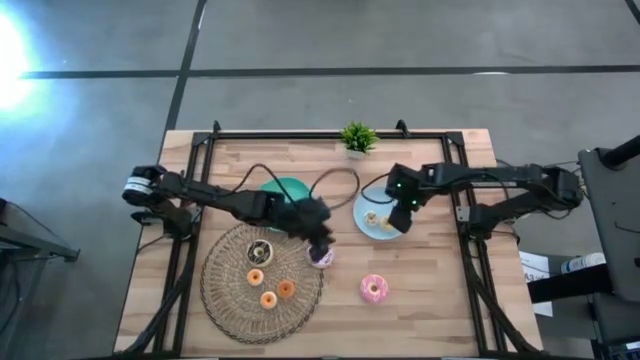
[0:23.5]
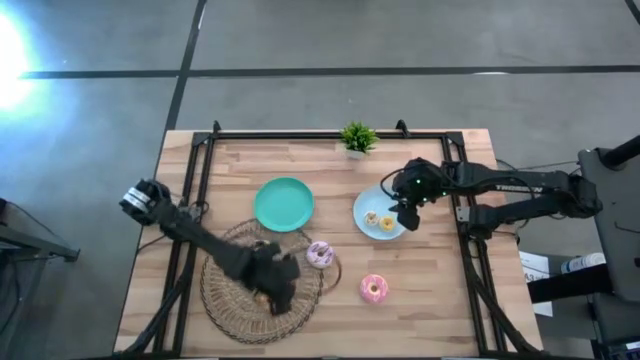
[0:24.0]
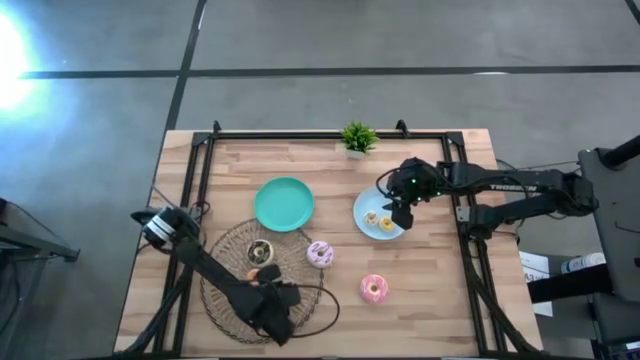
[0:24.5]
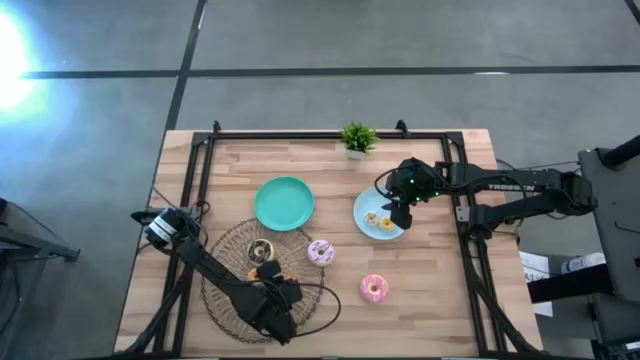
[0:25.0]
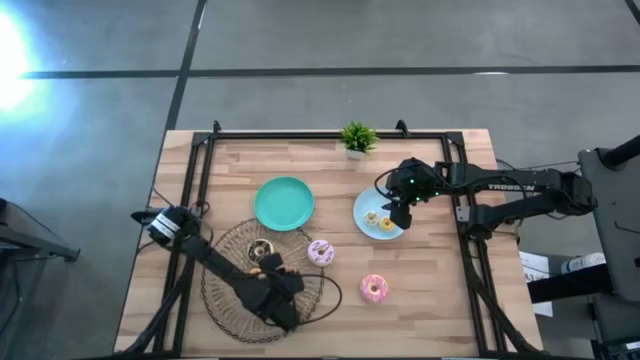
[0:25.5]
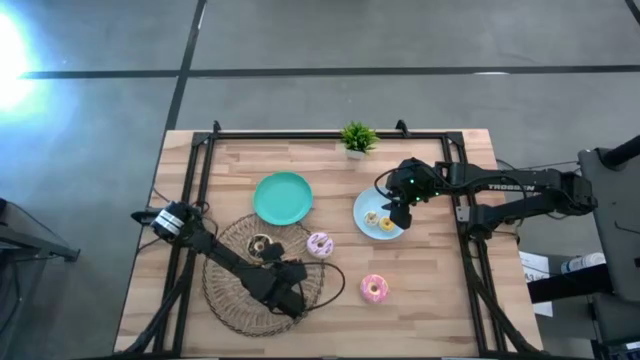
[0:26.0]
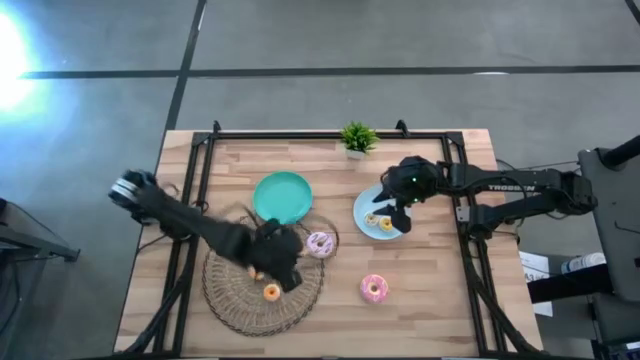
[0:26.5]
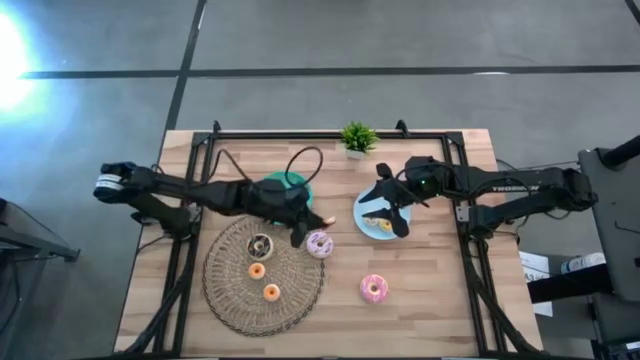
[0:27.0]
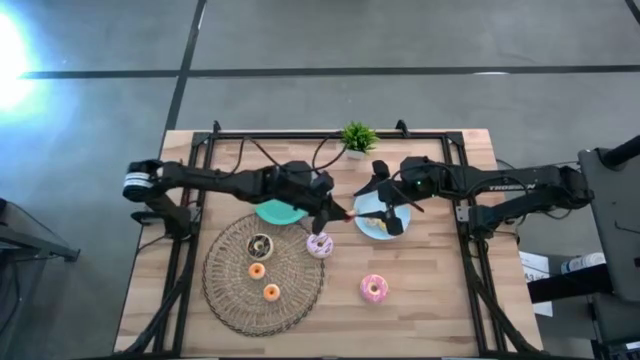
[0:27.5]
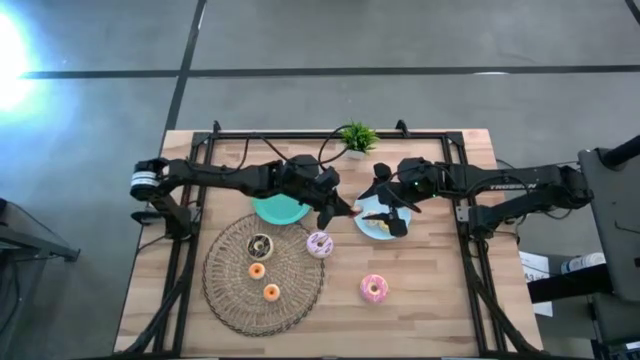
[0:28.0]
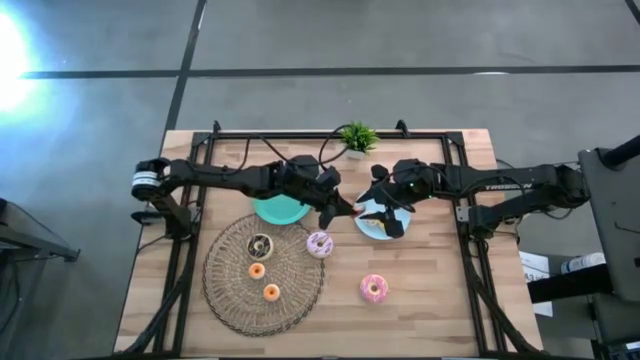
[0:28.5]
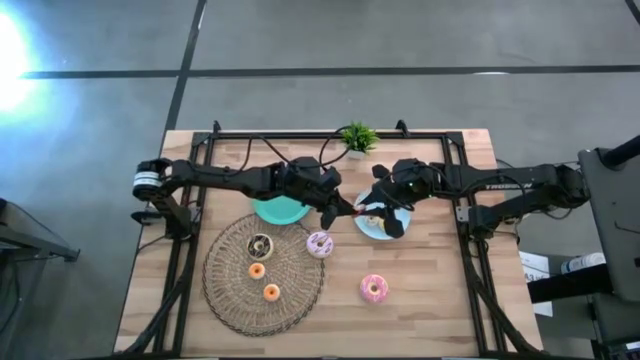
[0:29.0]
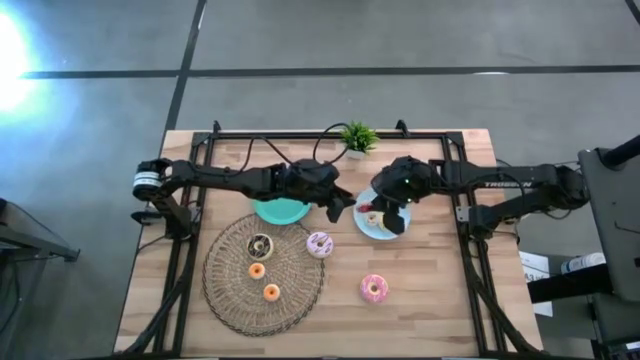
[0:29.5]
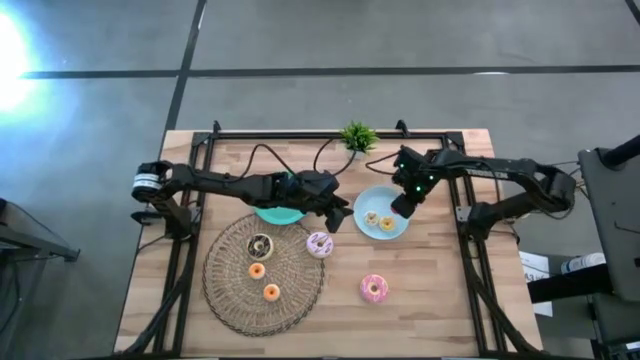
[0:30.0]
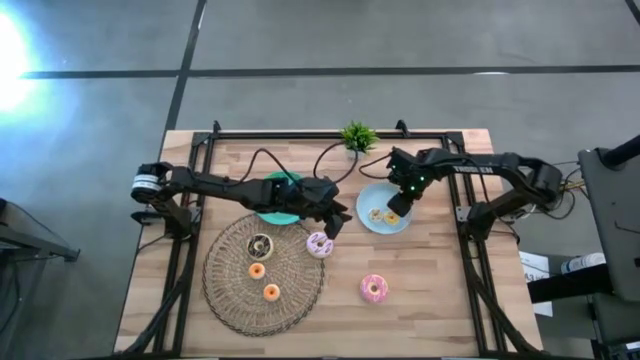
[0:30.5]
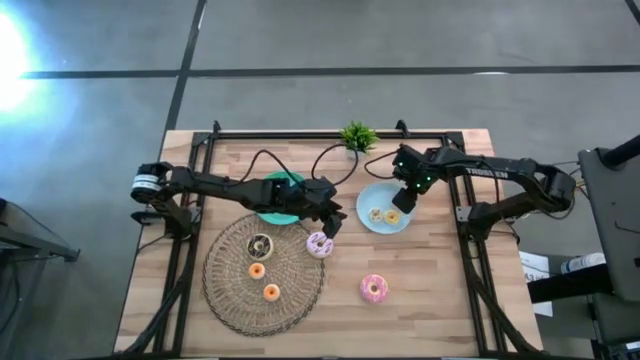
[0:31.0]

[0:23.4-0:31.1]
Task: Pick & Place donuts
Put the small orange donut into the blue plate

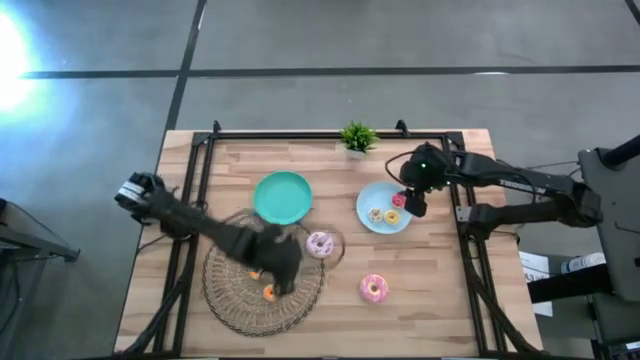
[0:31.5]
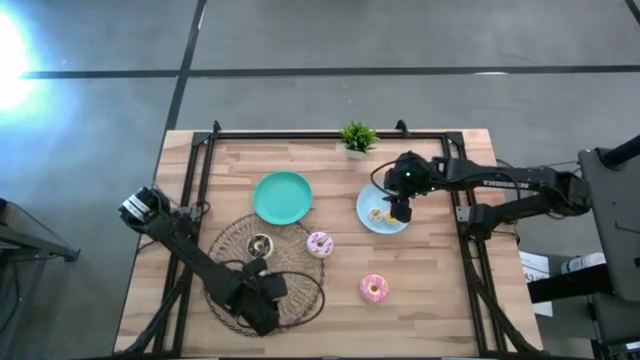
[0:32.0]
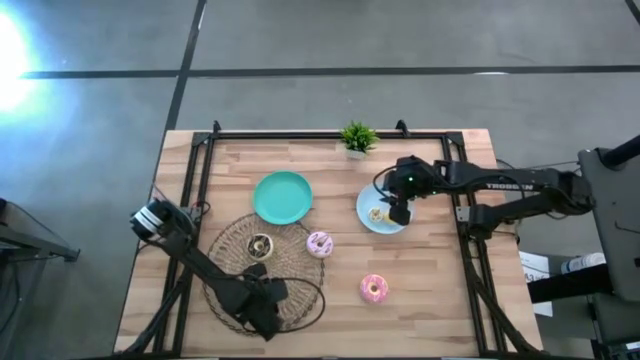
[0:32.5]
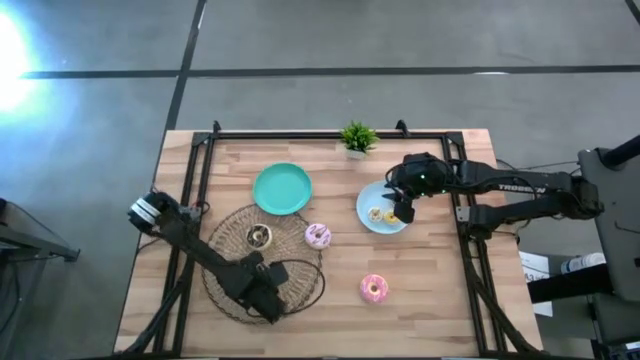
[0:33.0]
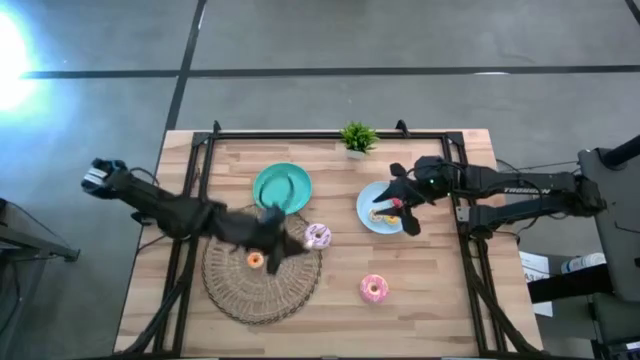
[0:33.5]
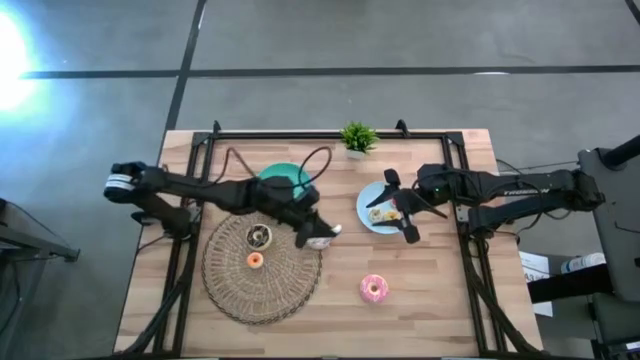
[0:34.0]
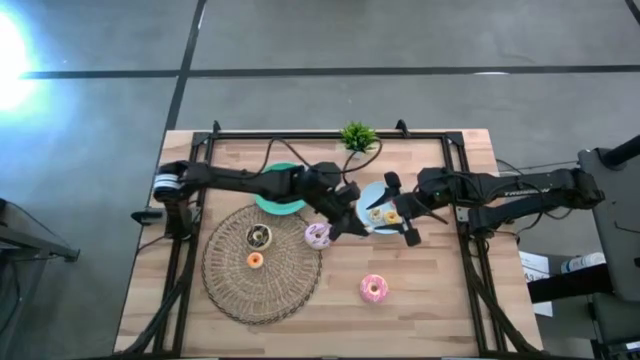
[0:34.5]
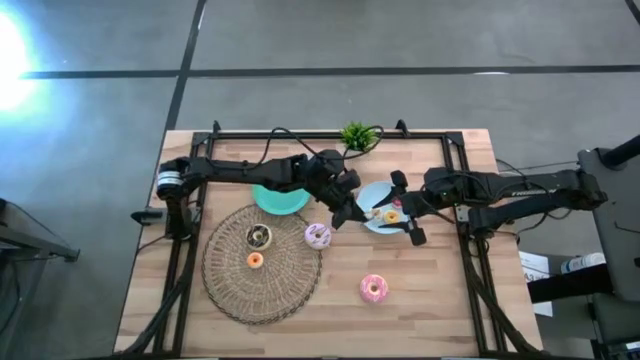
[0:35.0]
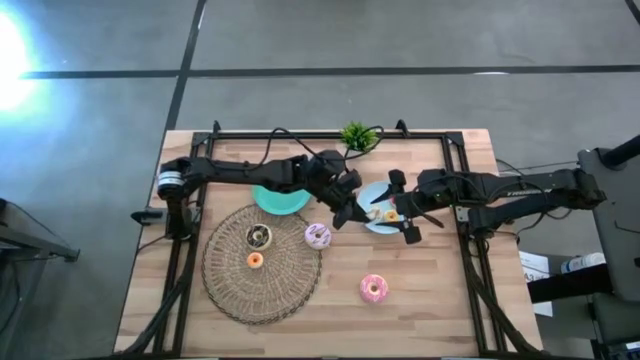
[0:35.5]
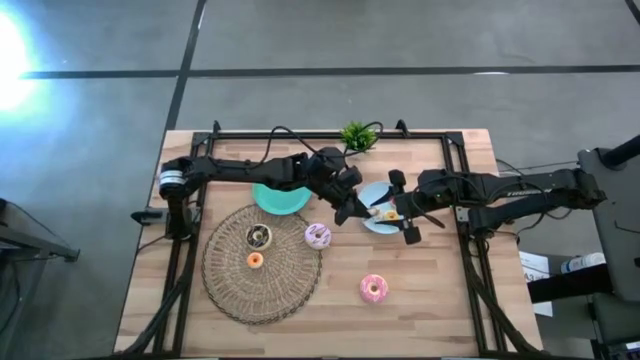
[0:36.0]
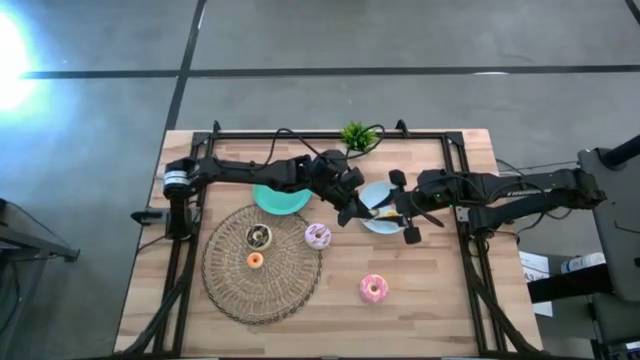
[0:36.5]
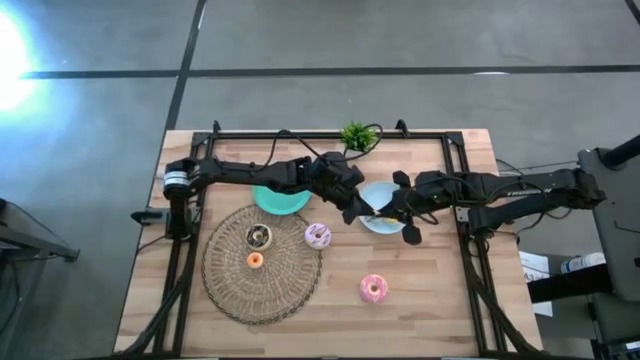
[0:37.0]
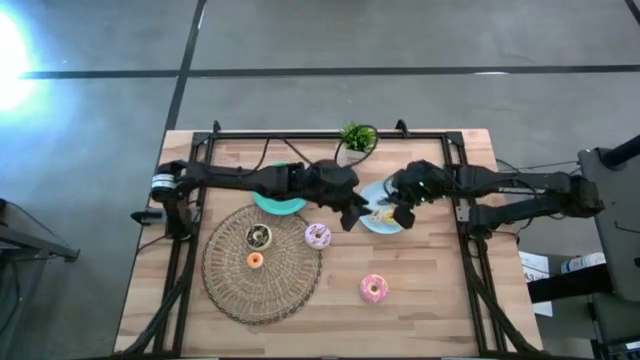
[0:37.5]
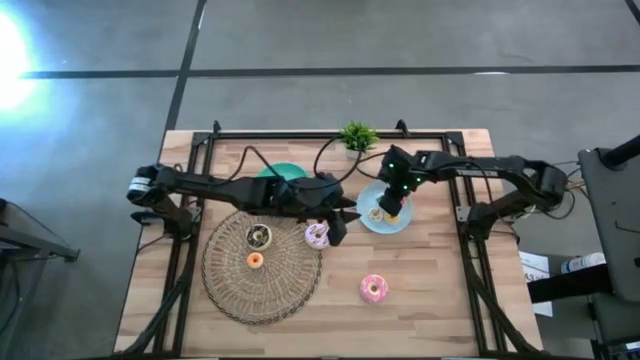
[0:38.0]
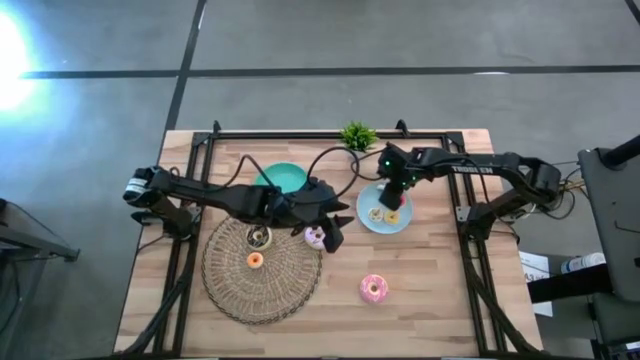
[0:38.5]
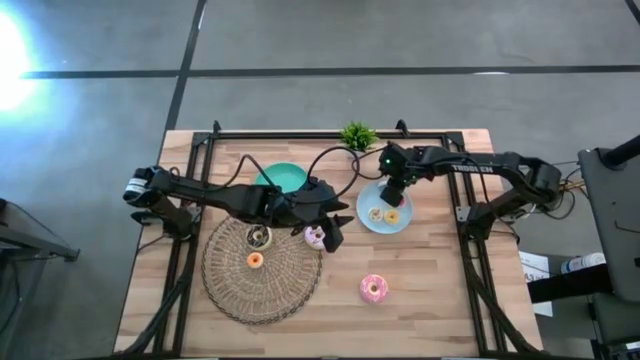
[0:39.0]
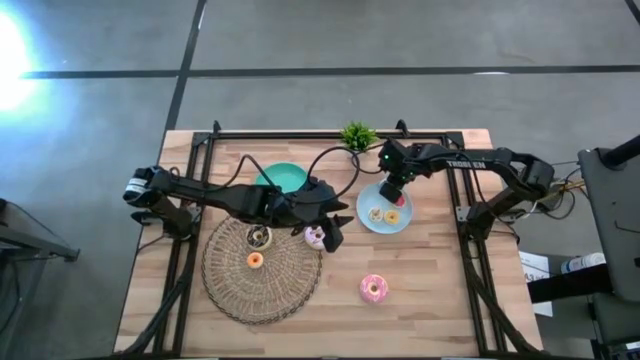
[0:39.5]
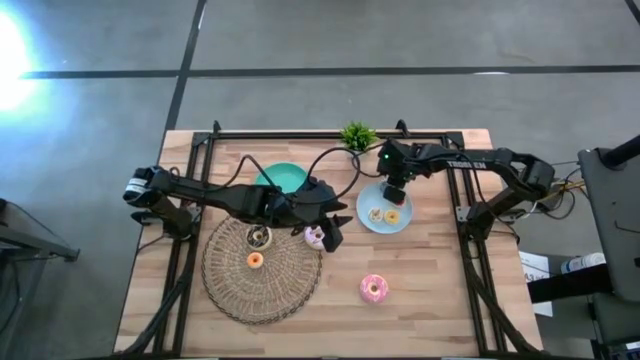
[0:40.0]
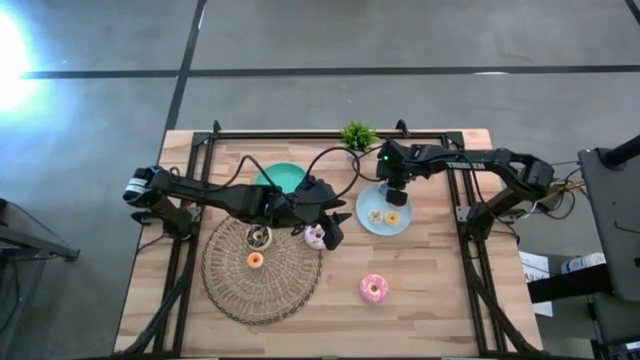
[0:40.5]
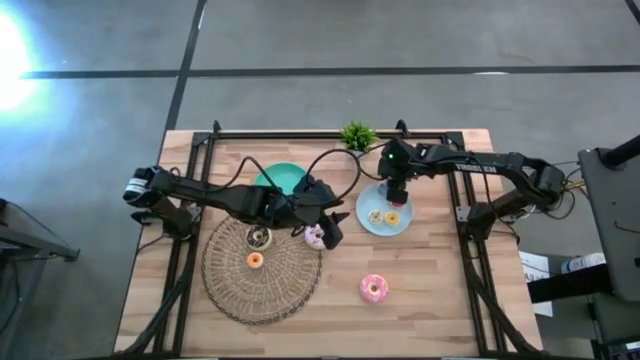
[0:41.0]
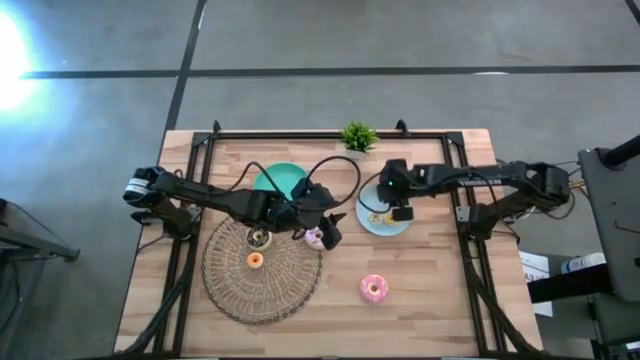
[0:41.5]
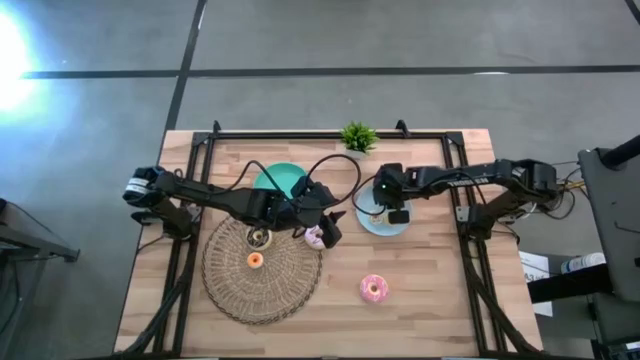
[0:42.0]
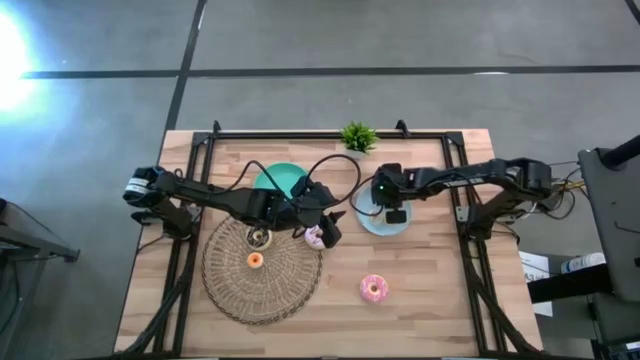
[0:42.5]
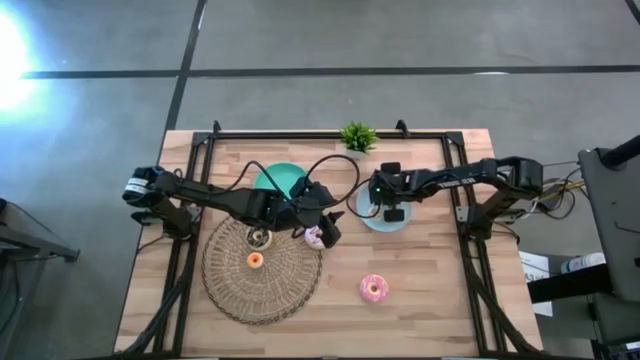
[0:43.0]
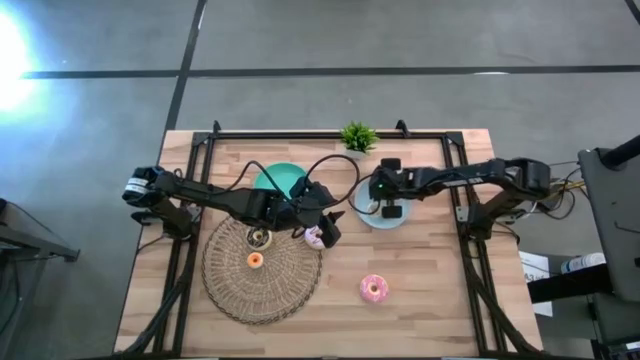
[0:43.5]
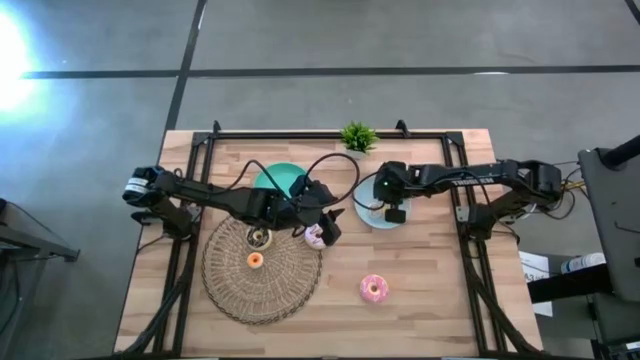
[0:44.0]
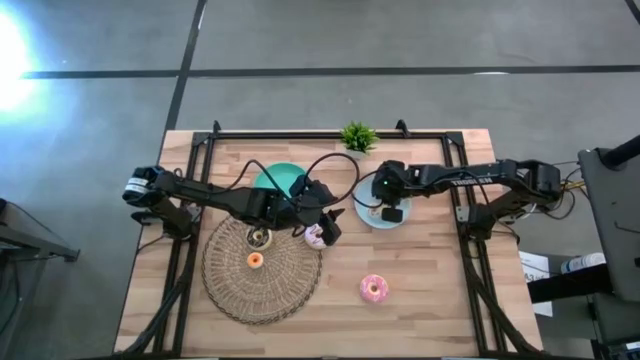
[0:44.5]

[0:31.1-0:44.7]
Put the small blue donut into the blue plate
